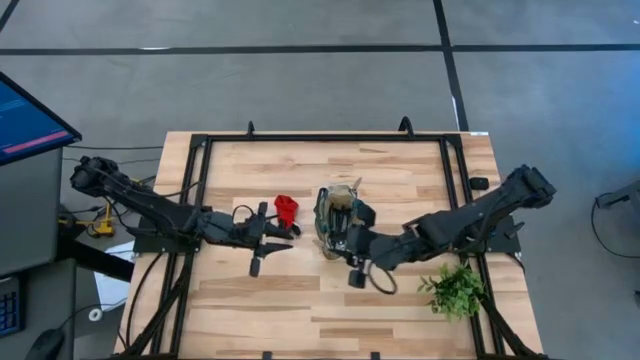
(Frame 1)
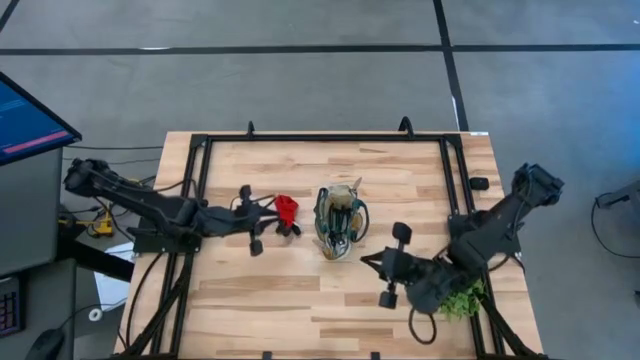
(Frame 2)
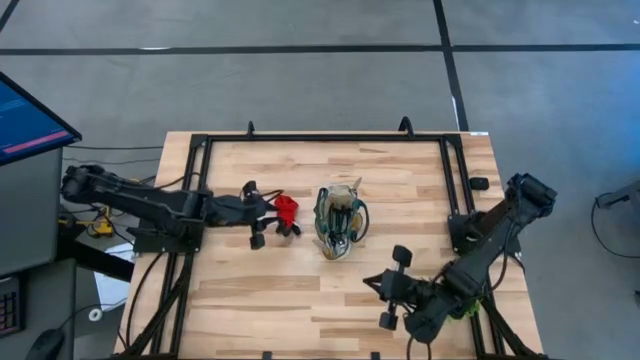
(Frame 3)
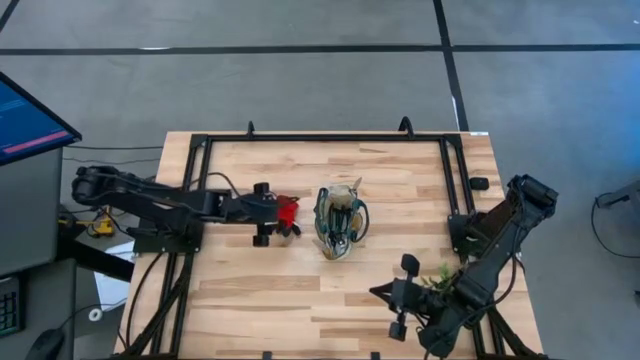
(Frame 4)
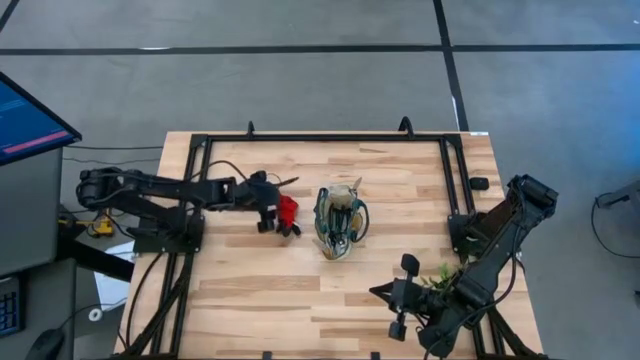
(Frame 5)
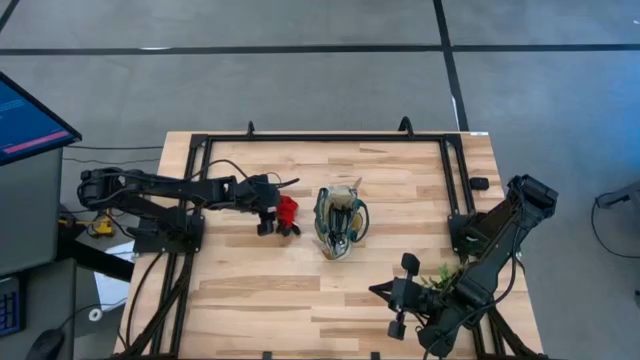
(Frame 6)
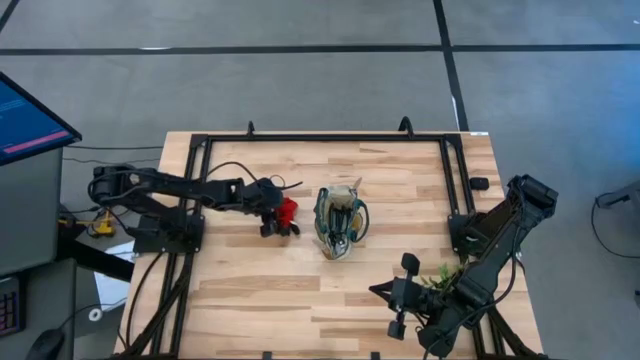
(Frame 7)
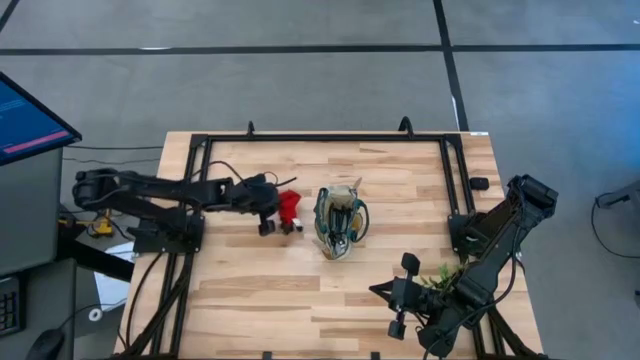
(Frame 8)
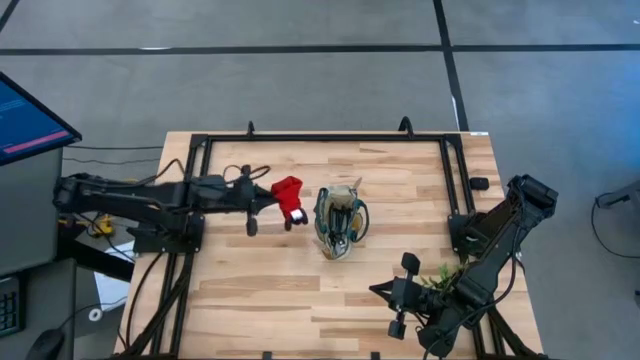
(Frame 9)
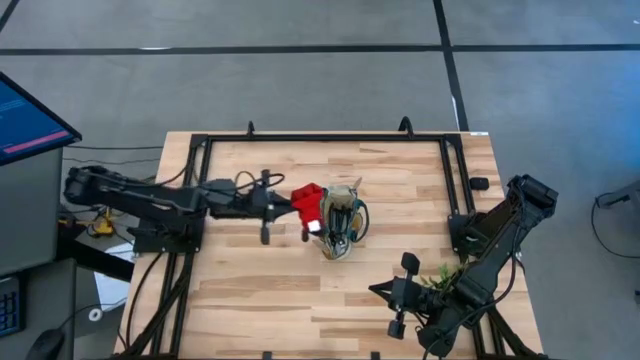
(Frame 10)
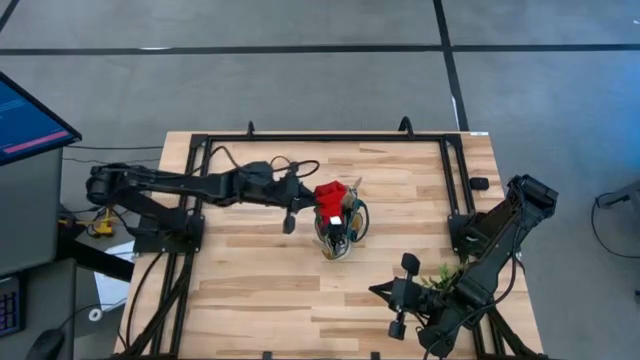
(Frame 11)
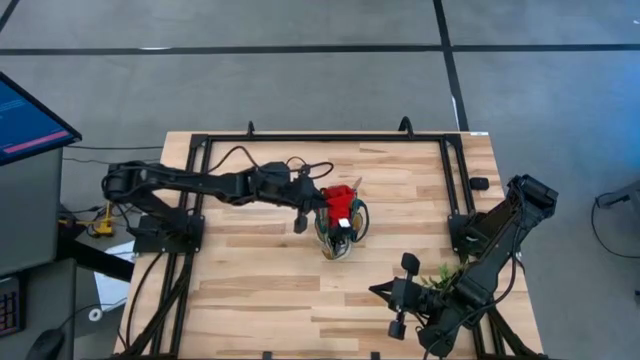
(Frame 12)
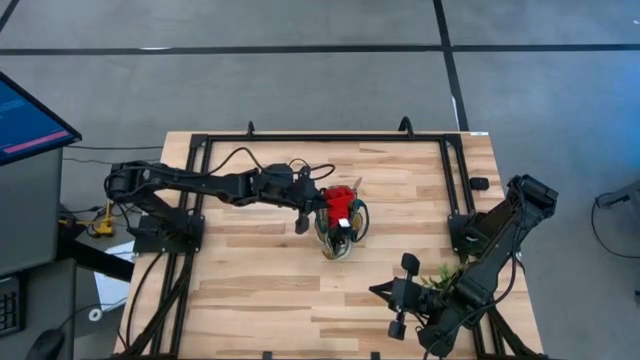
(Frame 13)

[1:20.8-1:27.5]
Task: Pick & Place Garden tools in Gardening bag
Put the red gloves into the gardening bag

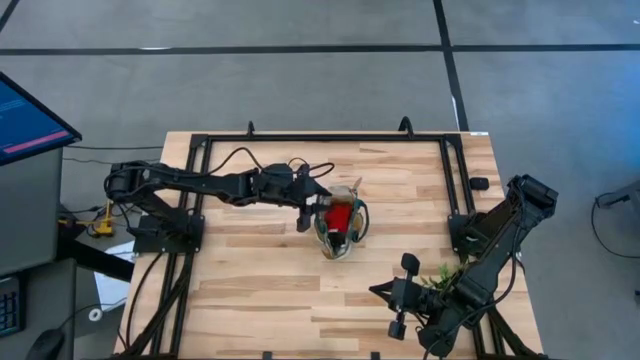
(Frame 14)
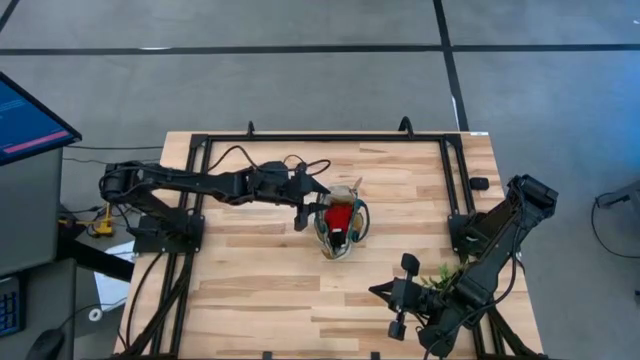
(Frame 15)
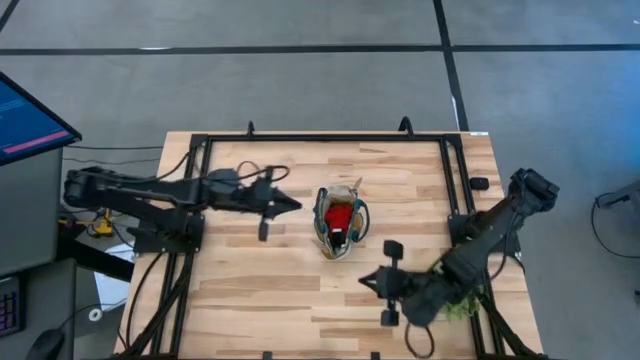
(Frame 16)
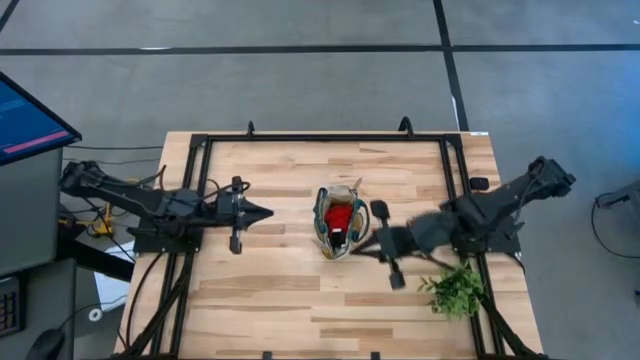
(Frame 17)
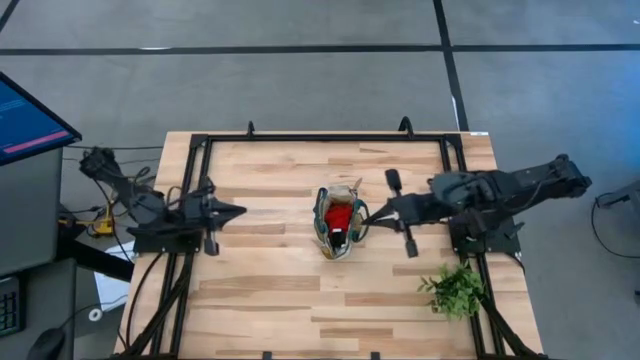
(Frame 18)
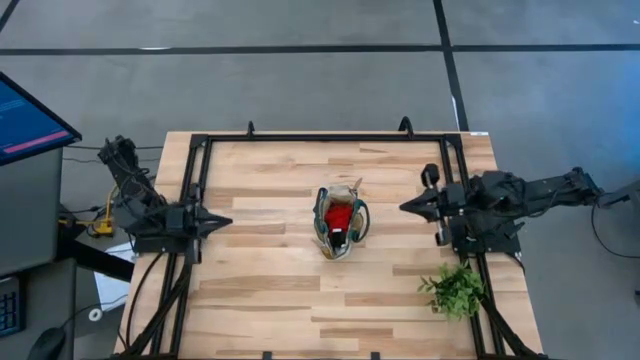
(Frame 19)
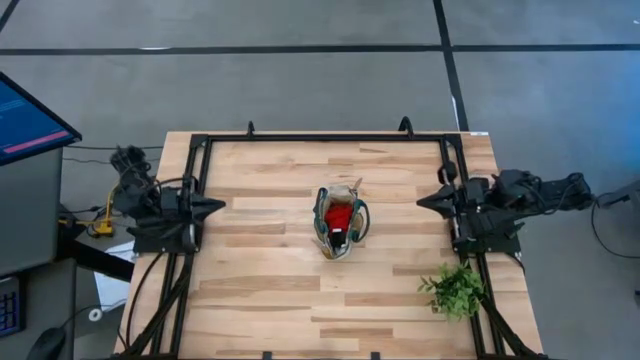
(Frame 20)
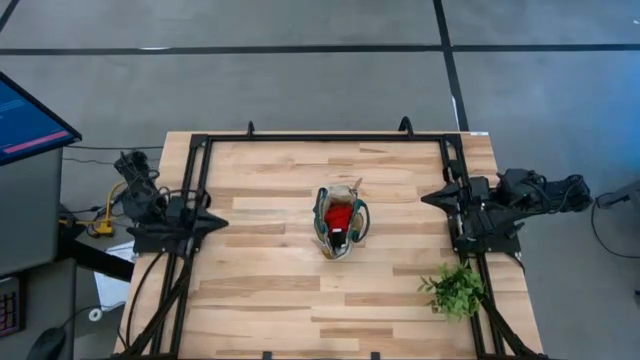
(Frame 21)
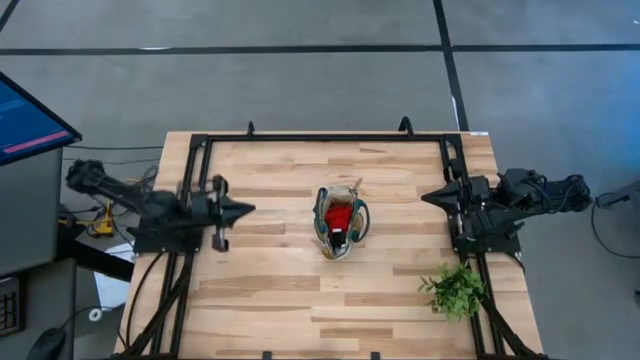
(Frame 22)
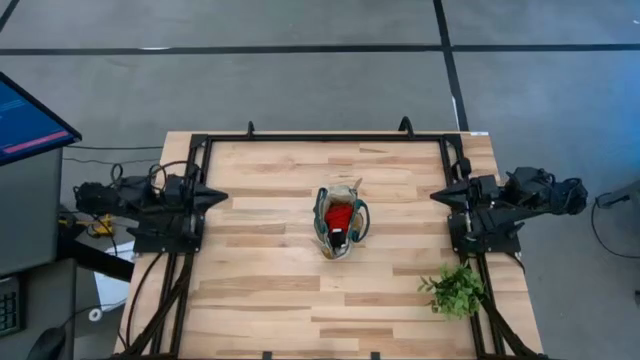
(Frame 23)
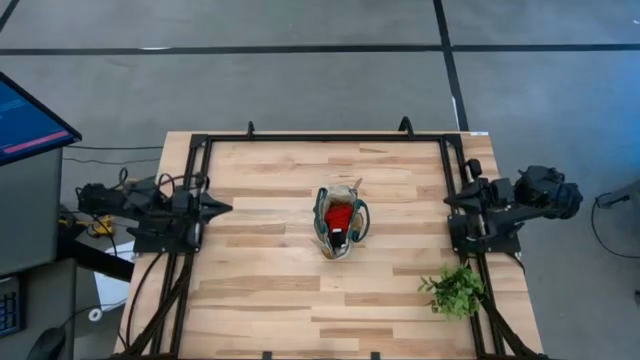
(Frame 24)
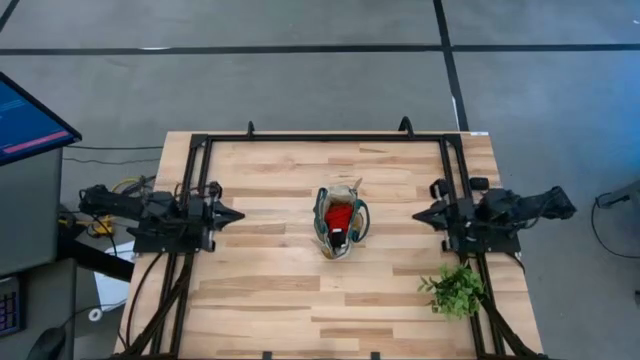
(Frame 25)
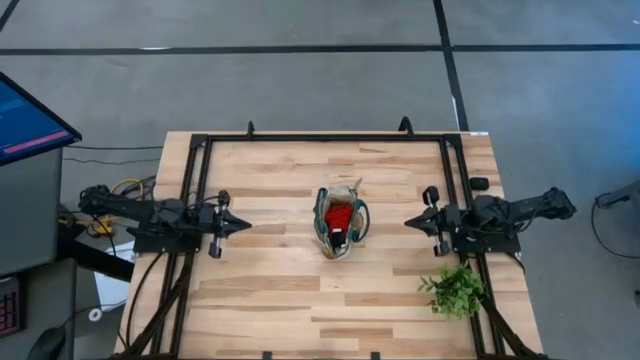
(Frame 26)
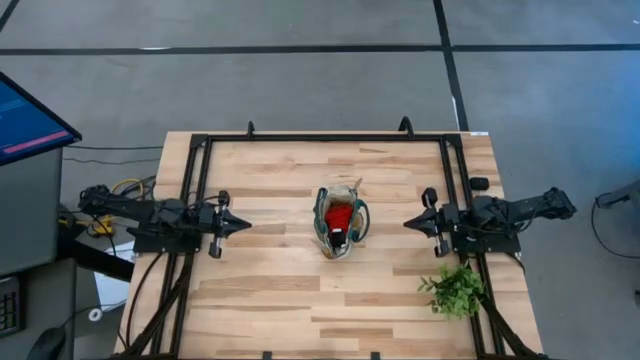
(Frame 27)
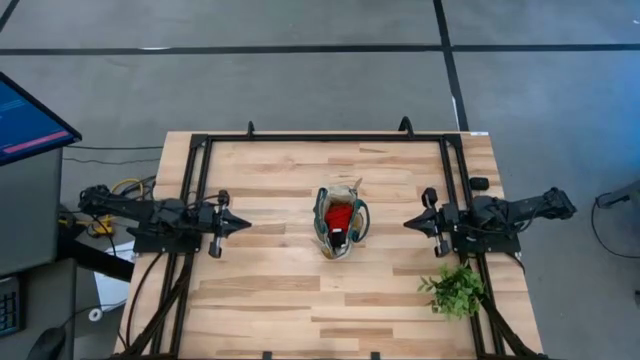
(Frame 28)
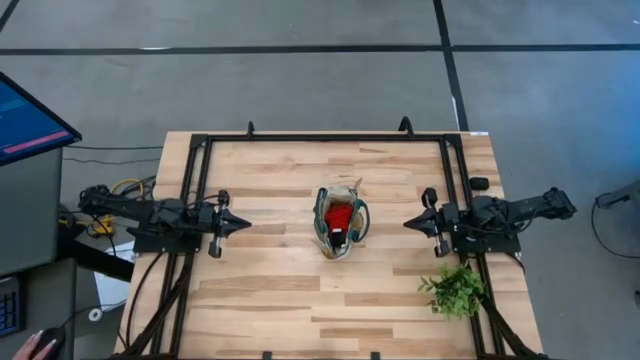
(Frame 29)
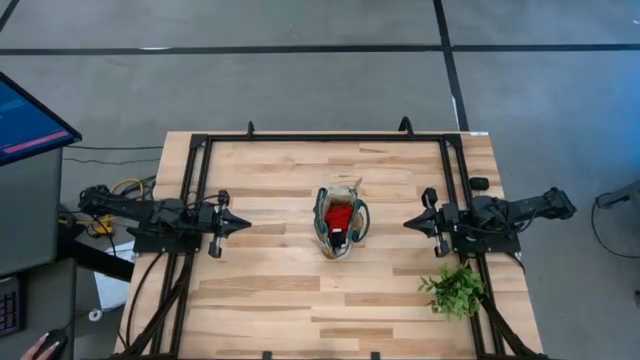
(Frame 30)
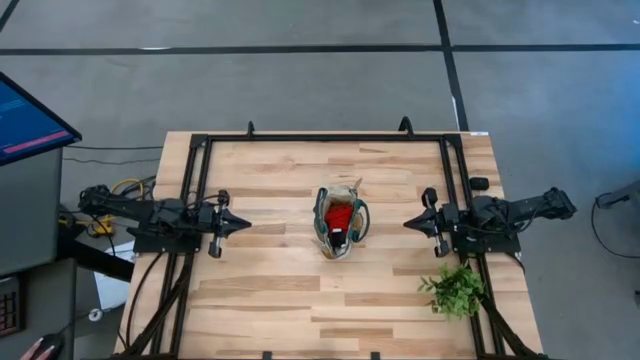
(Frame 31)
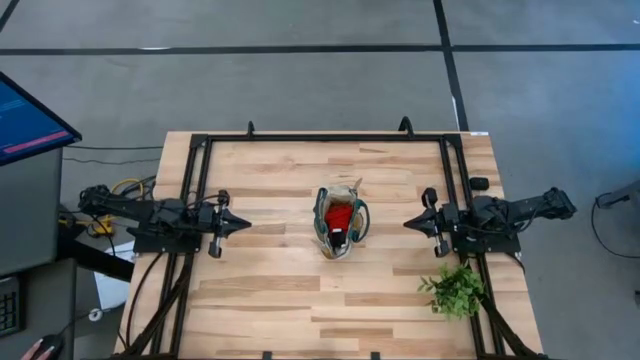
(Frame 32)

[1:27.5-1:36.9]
Return to Home Position

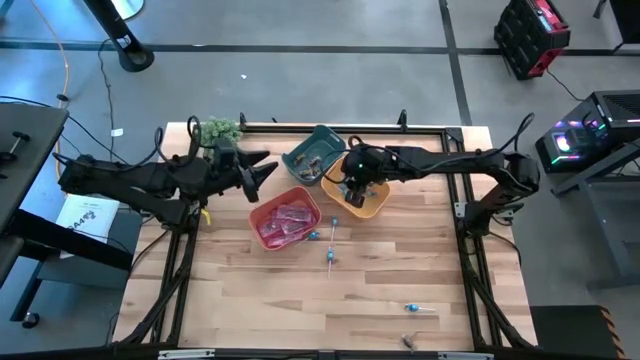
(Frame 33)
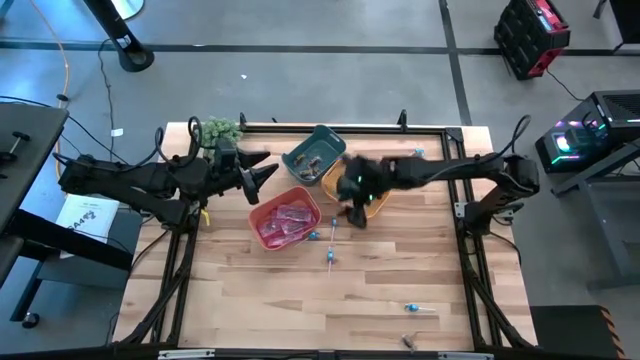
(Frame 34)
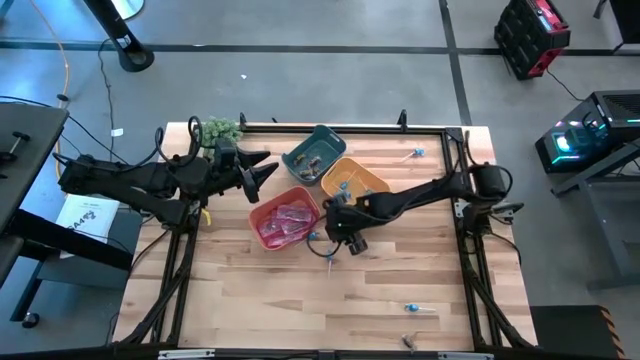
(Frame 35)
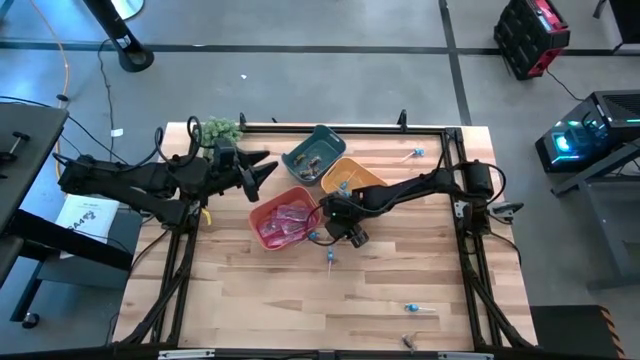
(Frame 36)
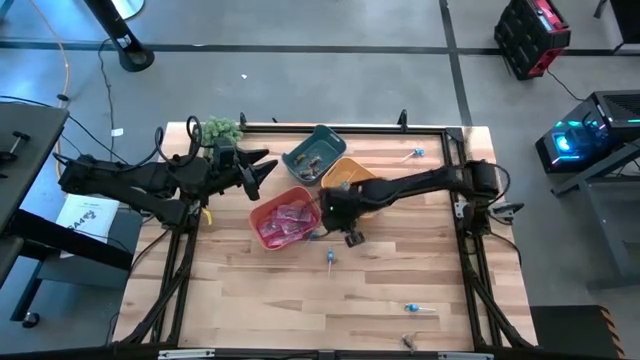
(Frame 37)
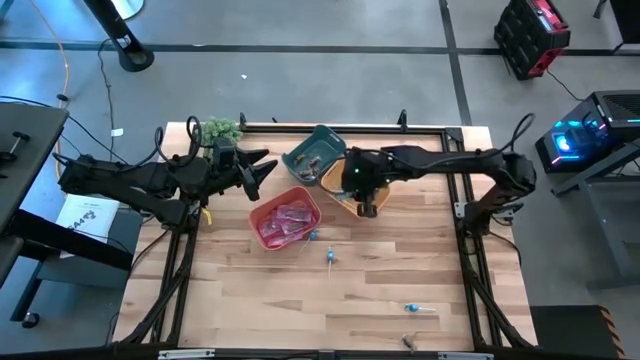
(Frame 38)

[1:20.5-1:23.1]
Task: Sort candy
Put the blue candy into the yellow bin

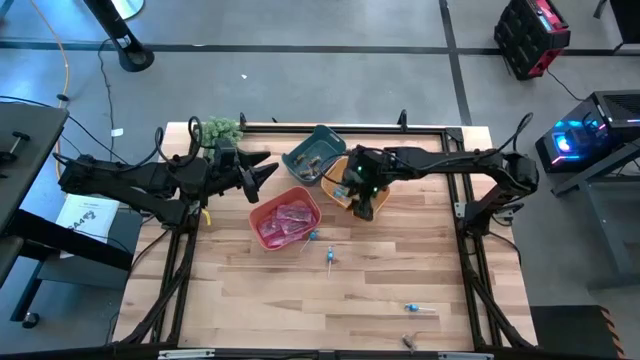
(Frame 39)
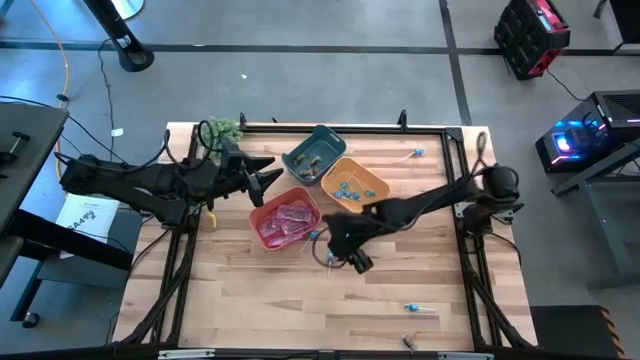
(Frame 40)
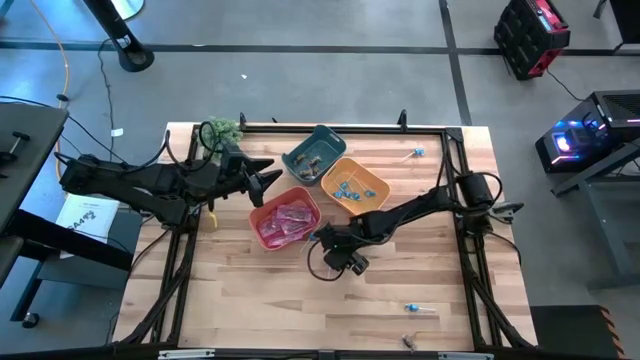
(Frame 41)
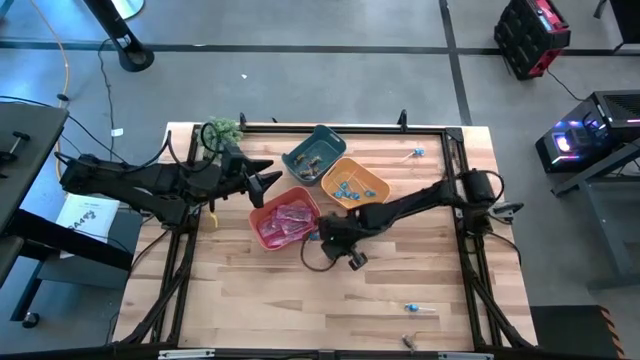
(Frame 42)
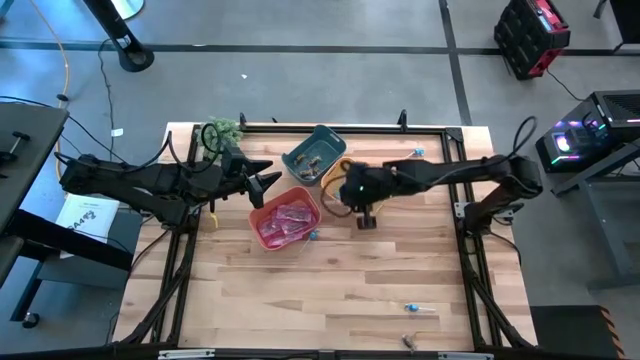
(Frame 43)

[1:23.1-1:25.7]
Put the blue candy into the yellow bin
